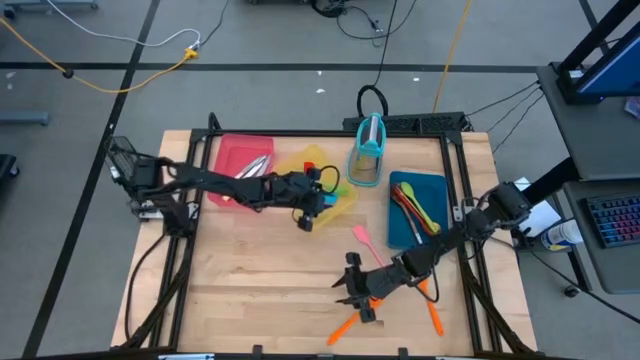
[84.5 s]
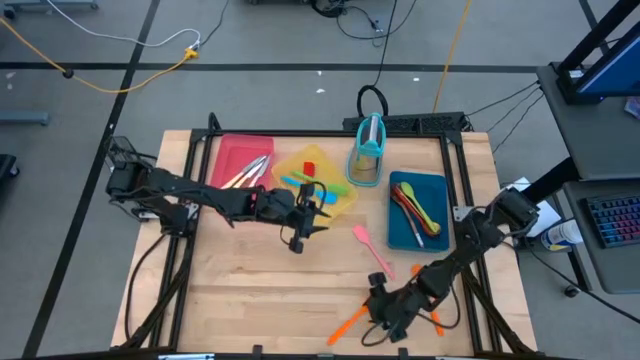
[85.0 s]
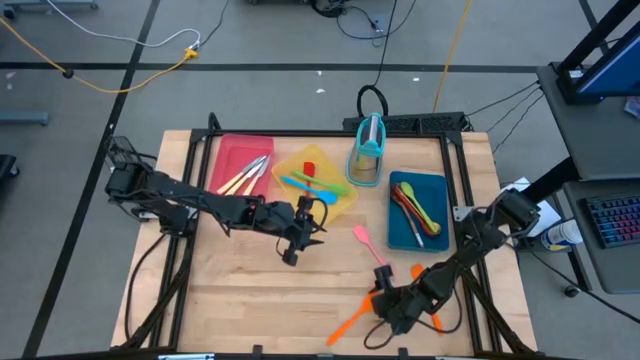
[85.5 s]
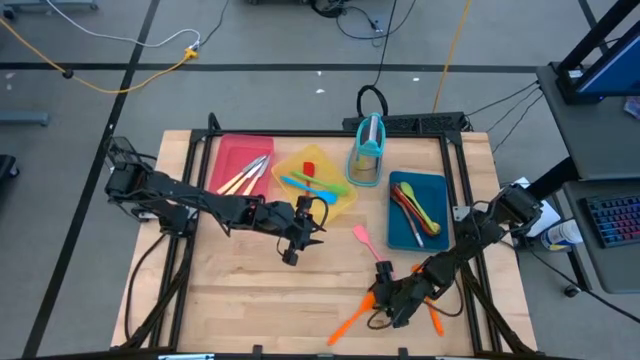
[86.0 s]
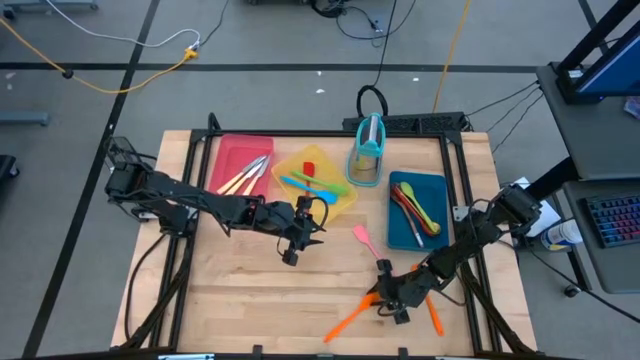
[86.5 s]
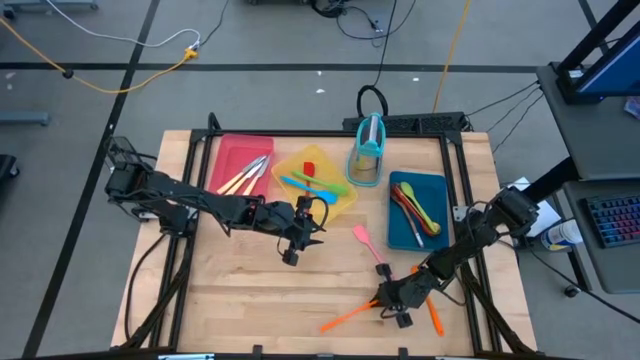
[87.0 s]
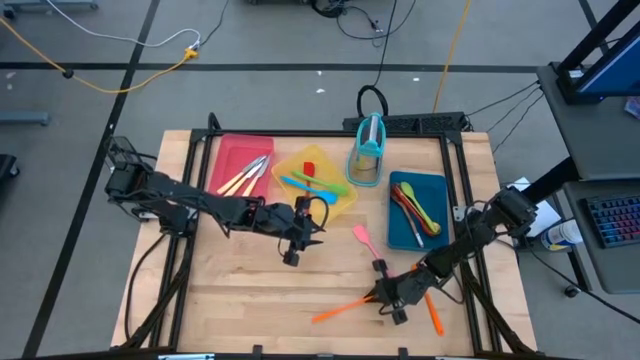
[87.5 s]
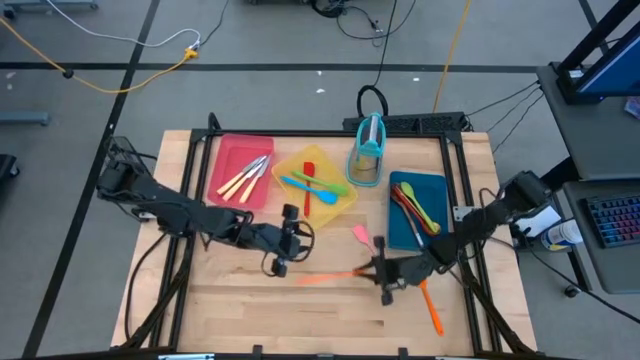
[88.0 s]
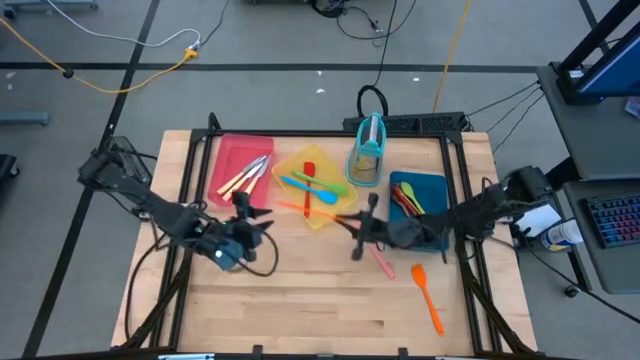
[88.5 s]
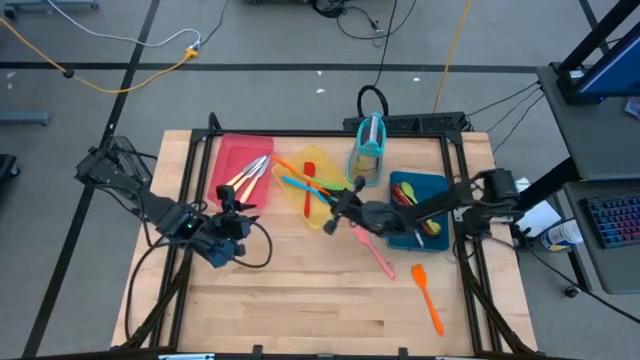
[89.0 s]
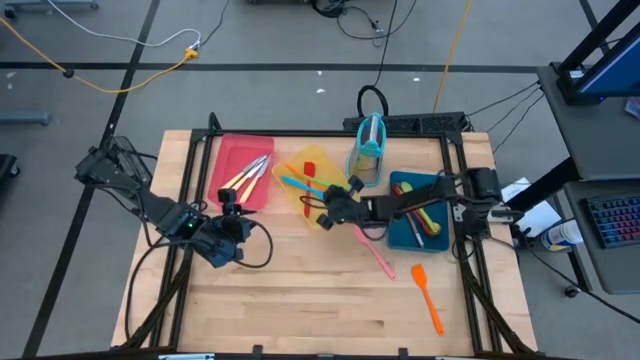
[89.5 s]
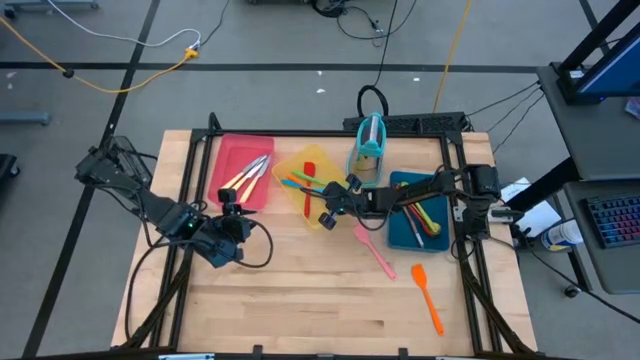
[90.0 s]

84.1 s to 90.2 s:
Task: Pick & Place Kitchen Items
Put the left orange spatula into the yellow bin

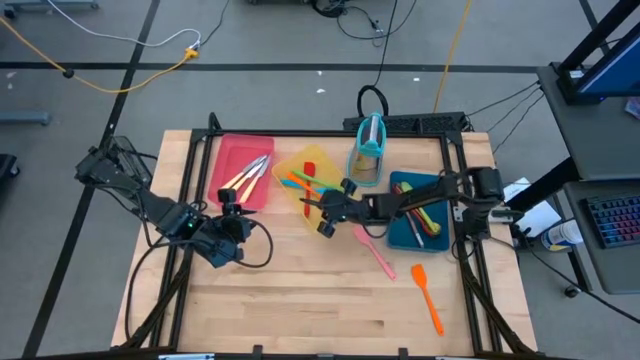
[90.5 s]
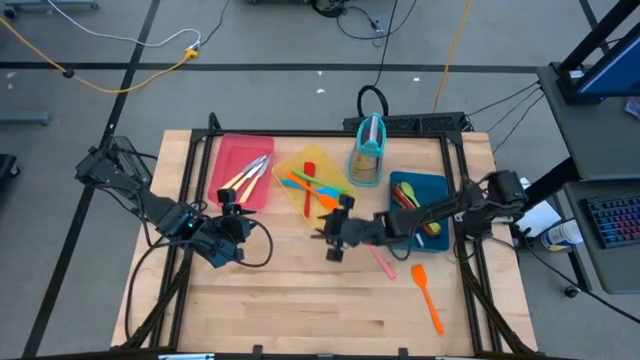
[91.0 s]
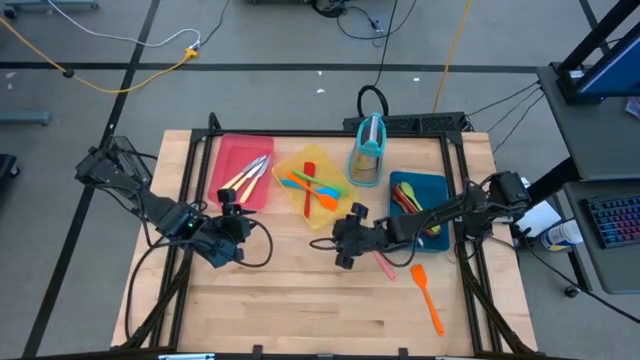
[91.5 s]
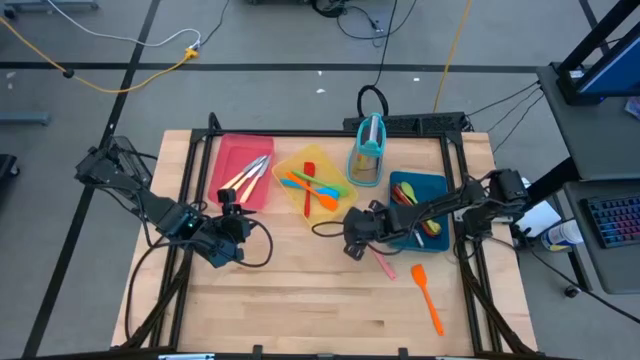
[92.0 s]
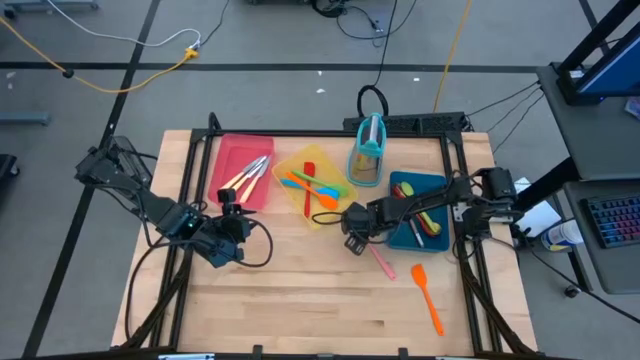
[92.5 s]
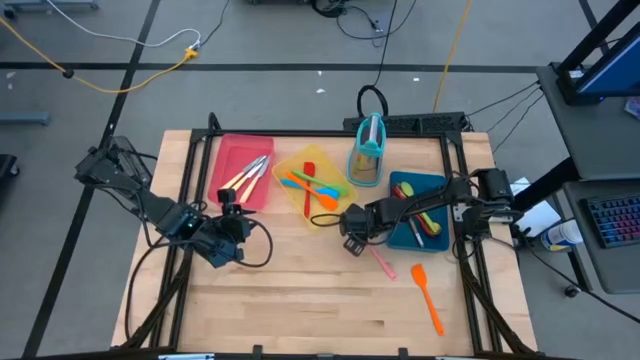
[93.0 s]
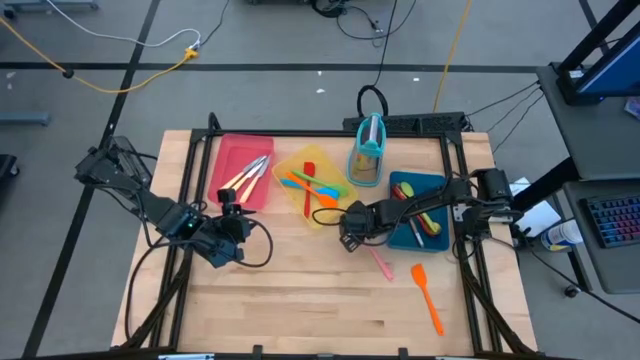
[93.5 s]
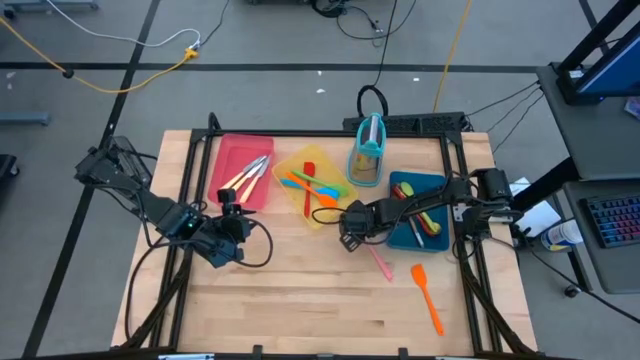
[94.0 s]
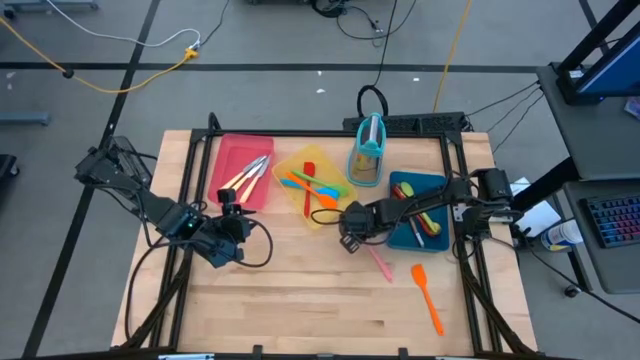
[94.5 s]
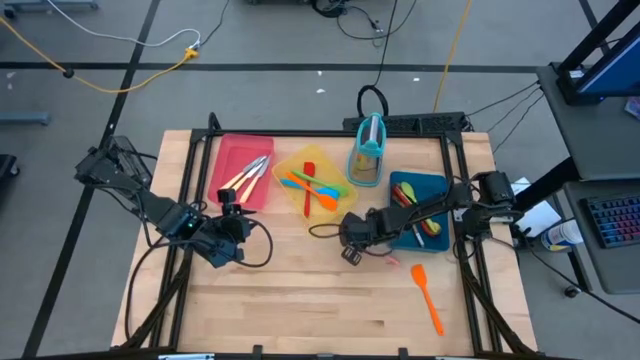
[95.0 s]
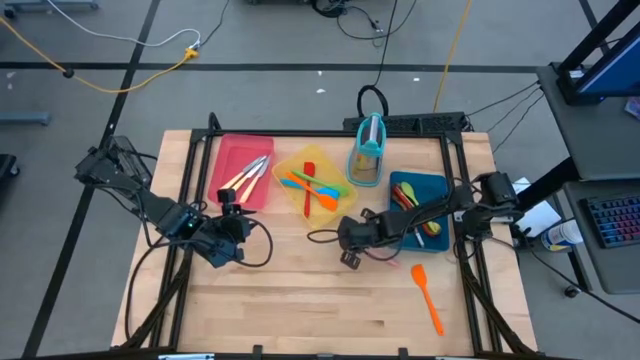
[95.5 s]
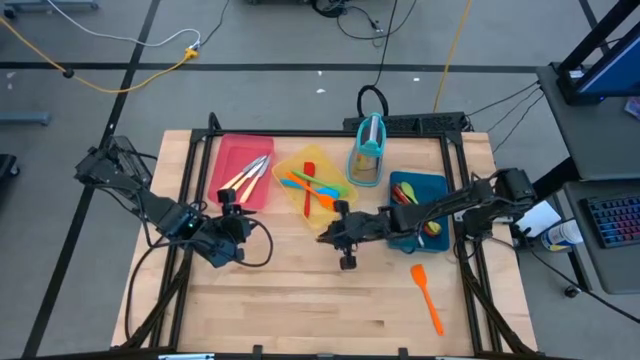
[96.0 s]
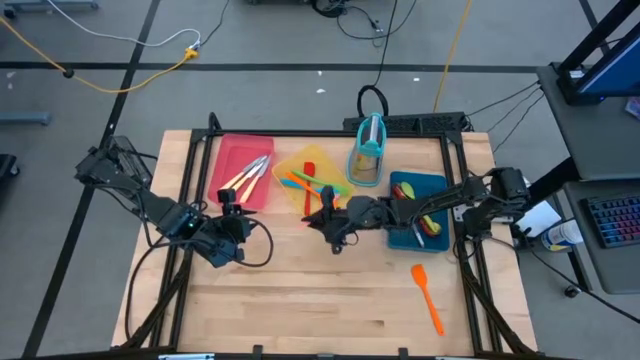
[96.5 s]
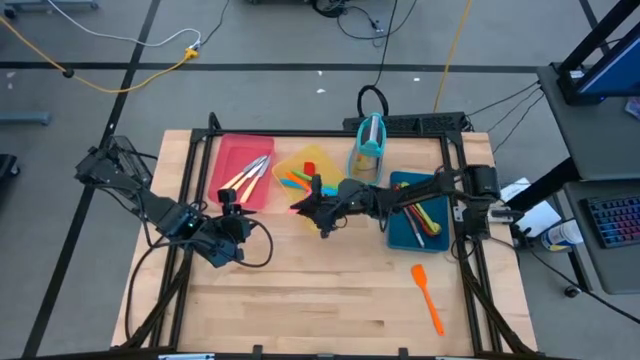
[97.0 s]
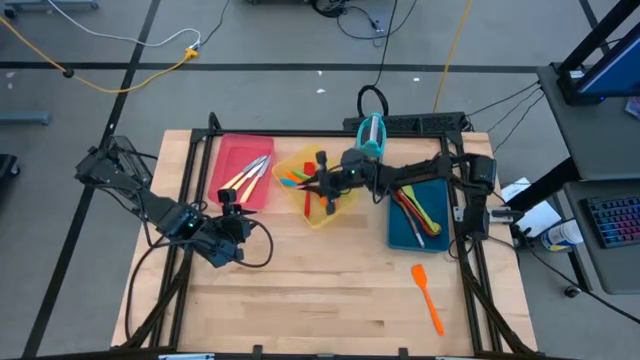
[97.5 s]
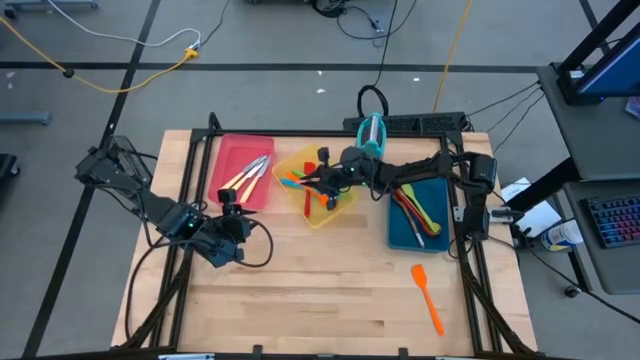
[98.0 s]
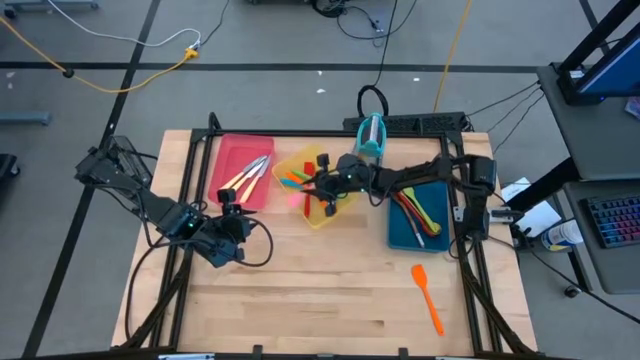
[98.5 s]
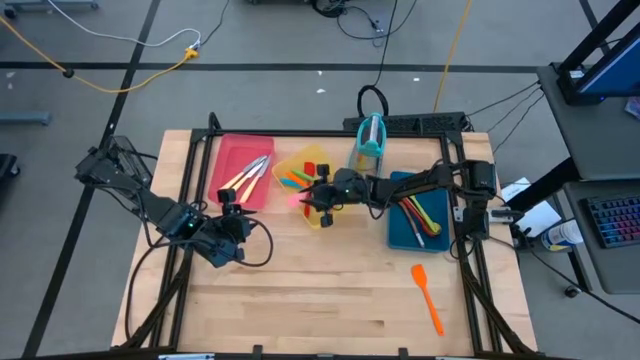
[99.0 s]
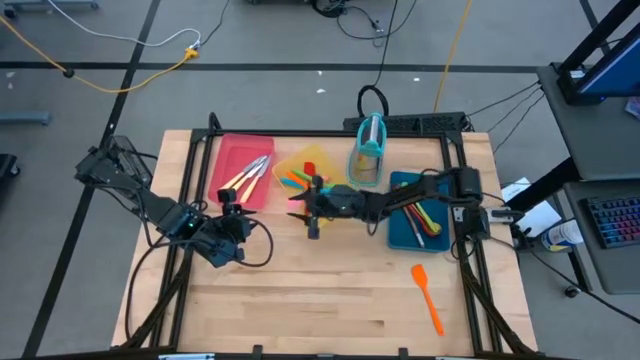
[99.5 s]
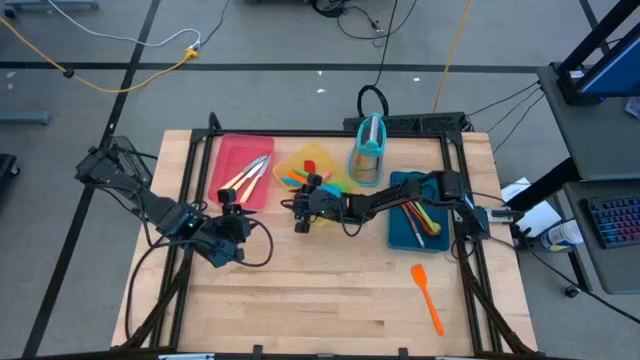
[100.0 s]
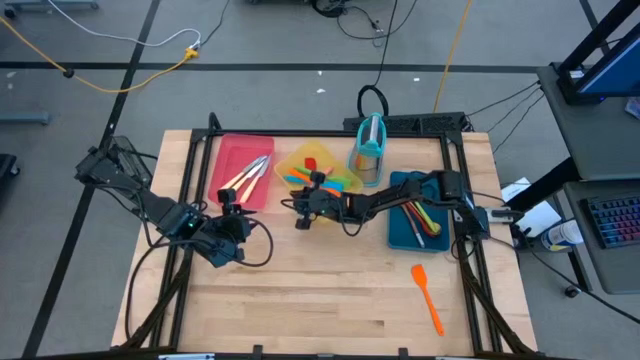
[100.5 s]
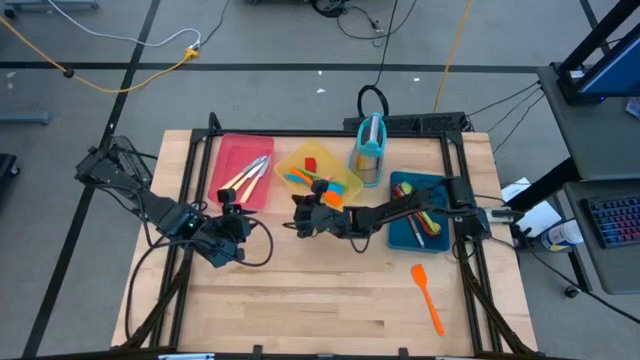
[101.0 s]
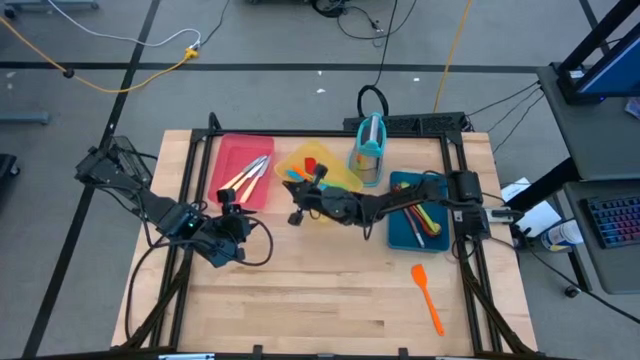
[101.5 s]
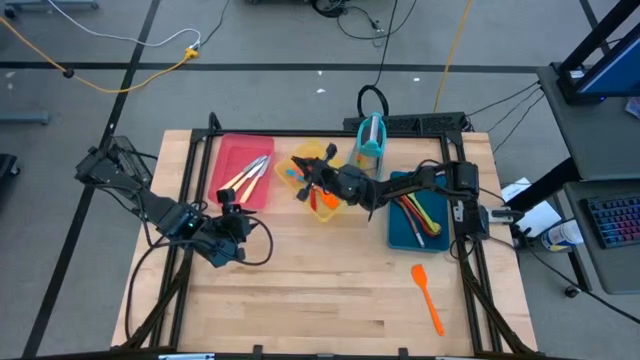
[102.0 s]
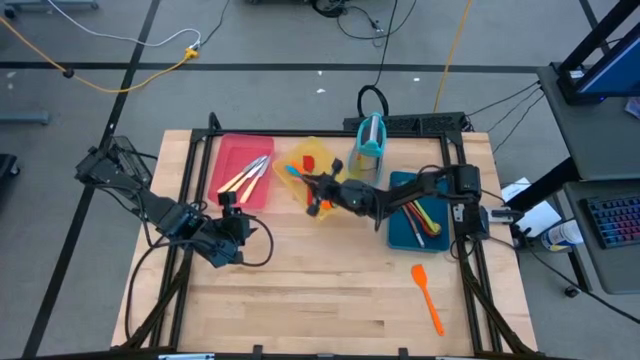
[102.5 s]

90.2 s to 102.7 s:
Put the pink spatula into the yellow bin

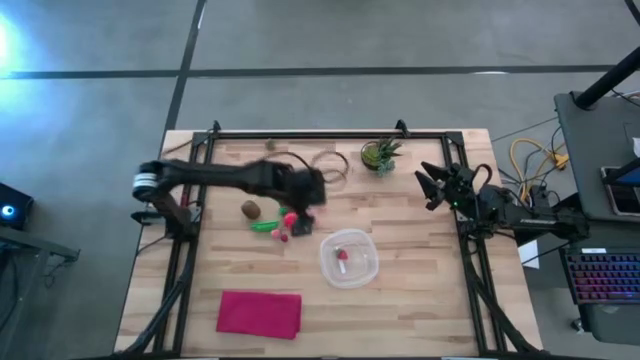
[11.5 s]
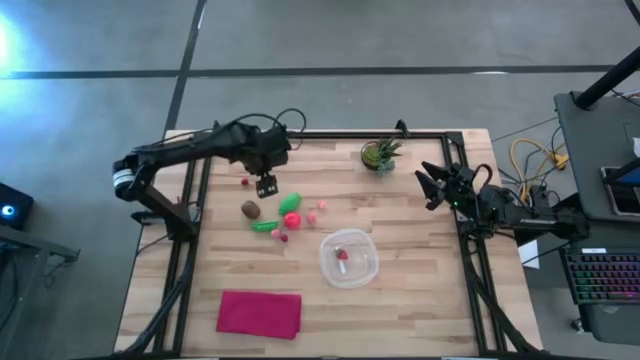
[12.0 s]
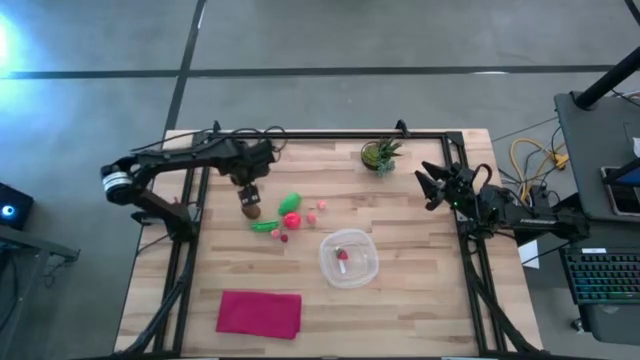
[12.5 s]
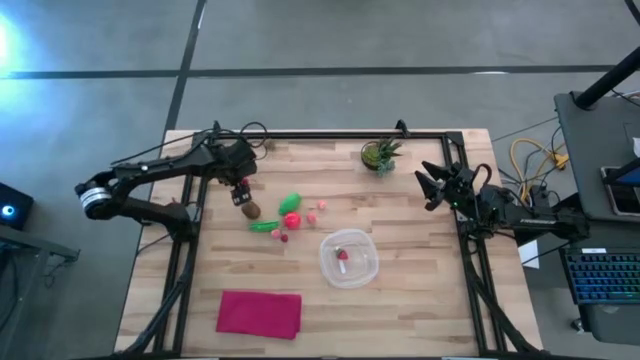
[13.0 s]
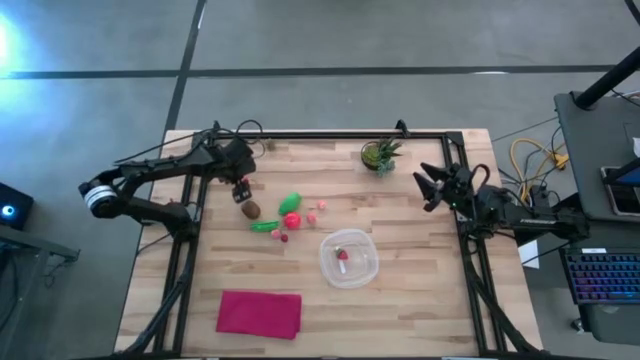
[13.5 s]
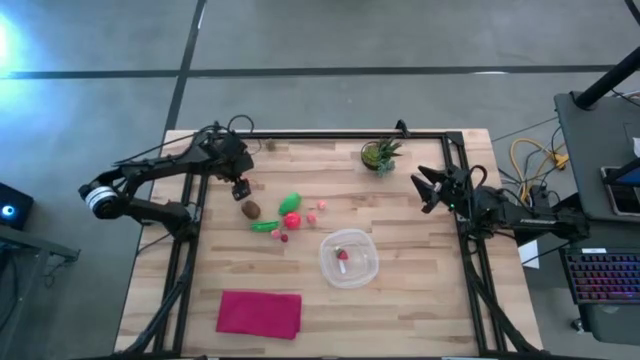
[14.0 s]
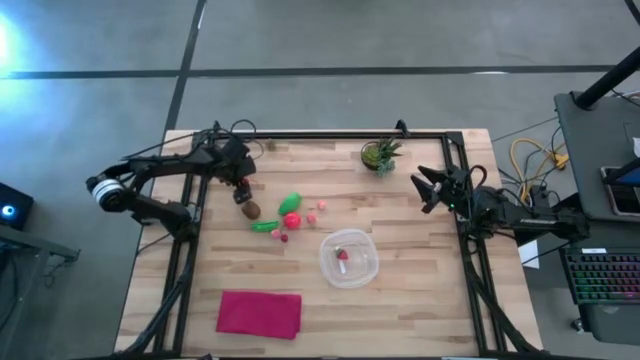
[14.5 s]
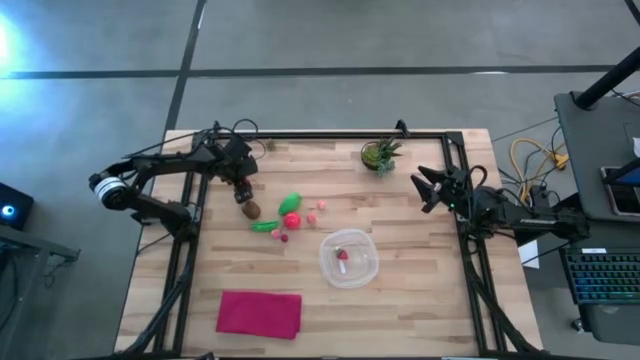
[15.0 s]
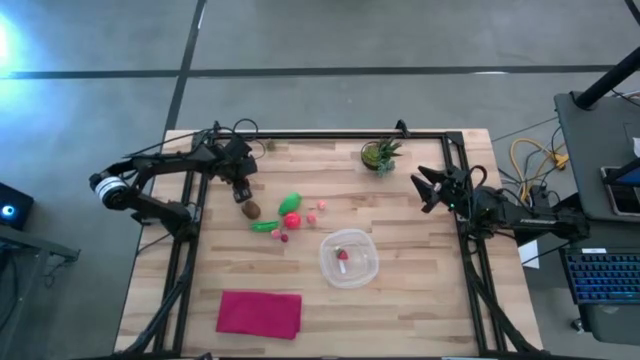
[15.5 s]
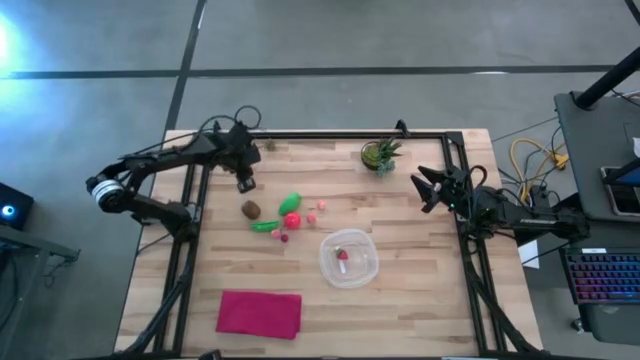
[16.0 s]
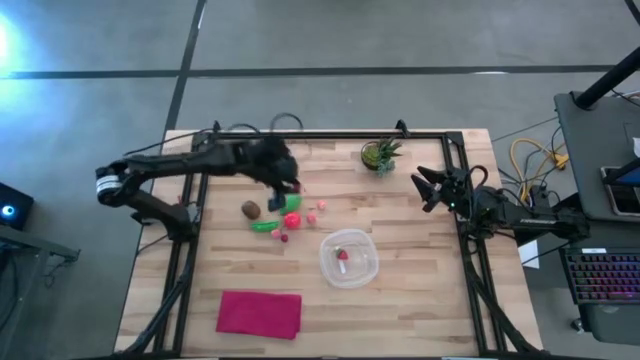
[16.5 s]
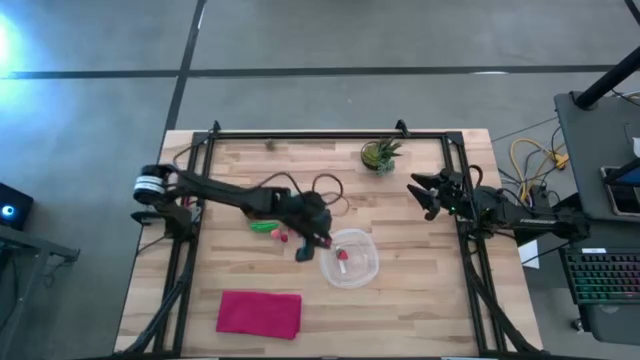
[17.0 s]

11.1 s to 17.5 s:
Task: Pick and placing Produce into tupperware
Put the top cherry into the container
